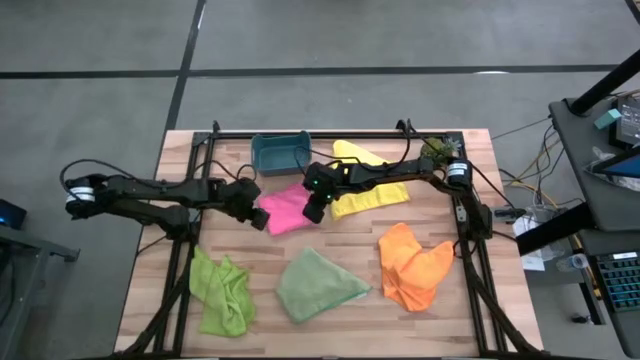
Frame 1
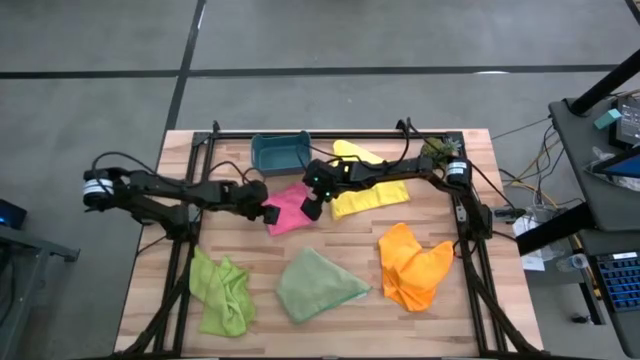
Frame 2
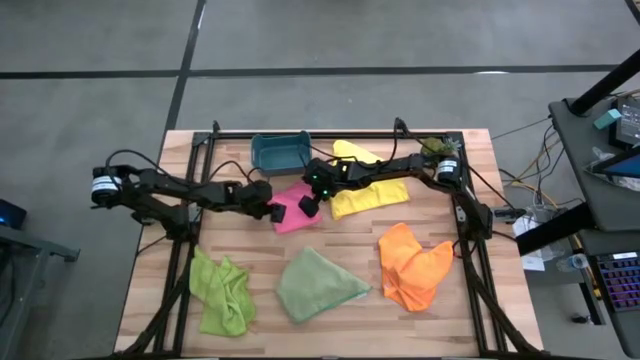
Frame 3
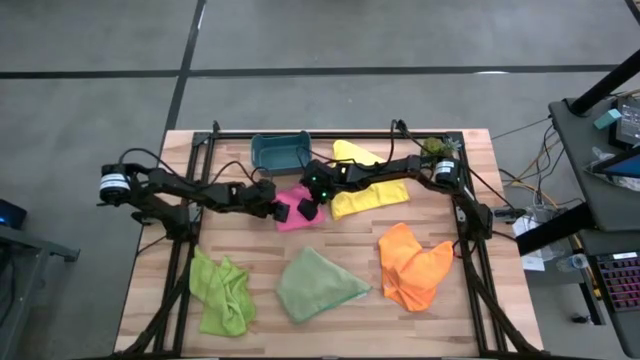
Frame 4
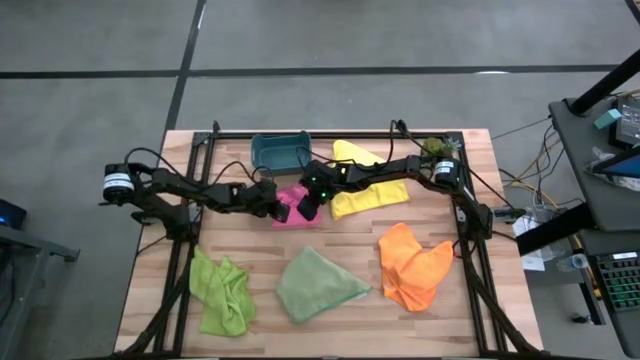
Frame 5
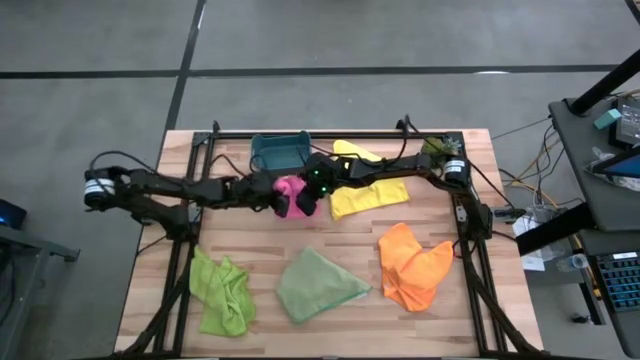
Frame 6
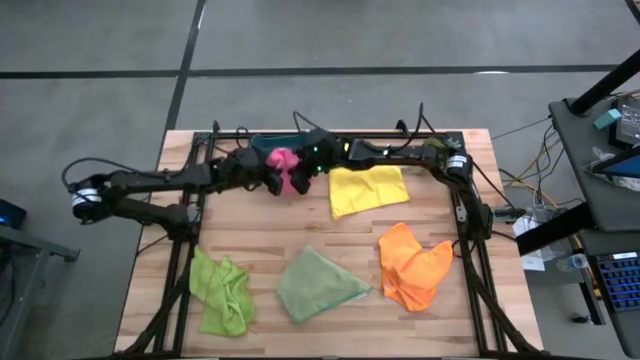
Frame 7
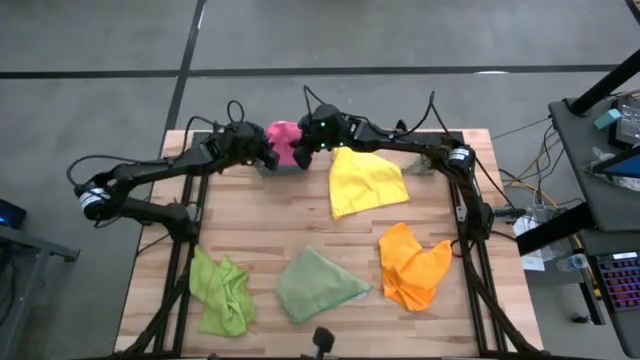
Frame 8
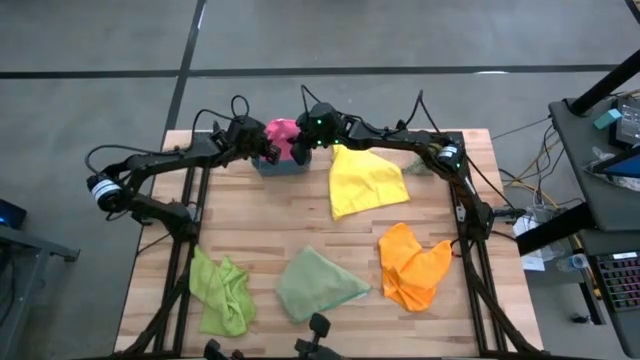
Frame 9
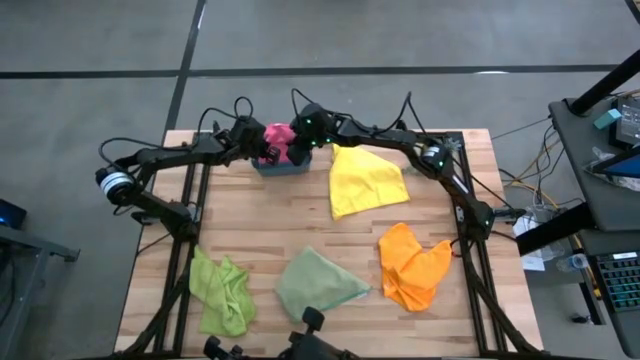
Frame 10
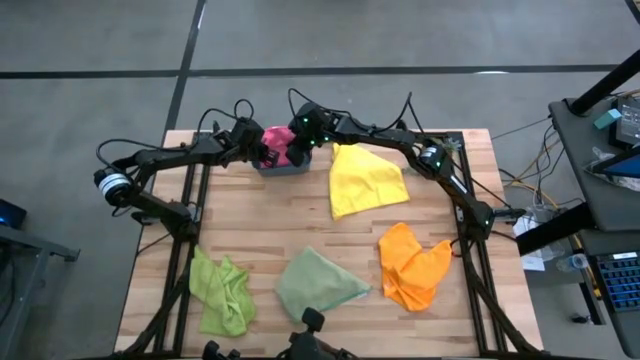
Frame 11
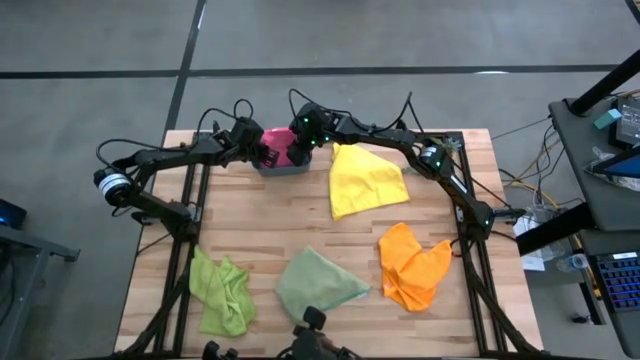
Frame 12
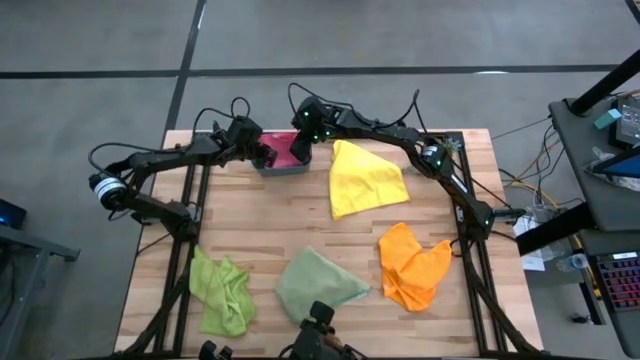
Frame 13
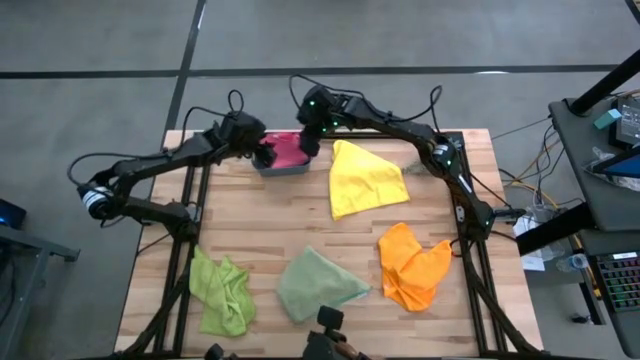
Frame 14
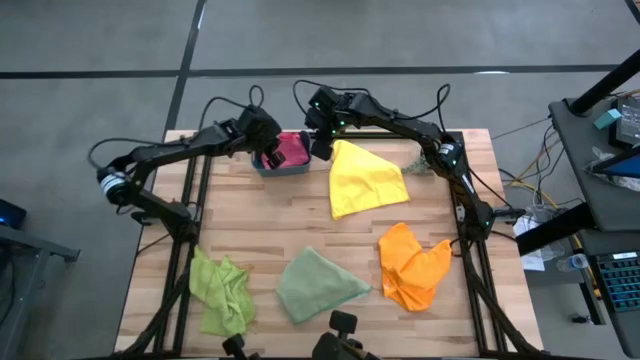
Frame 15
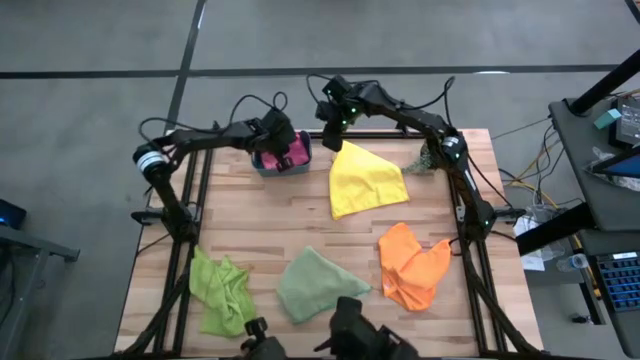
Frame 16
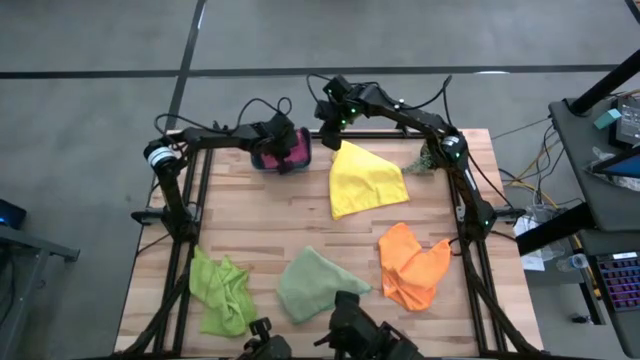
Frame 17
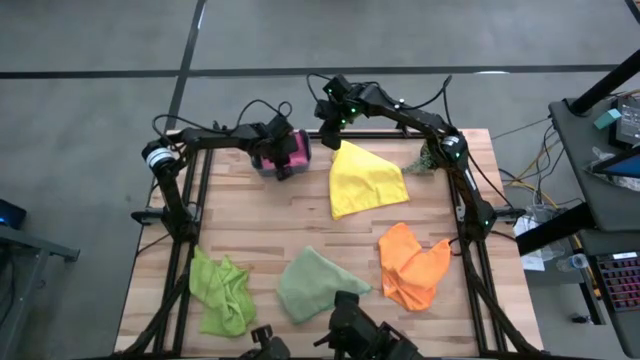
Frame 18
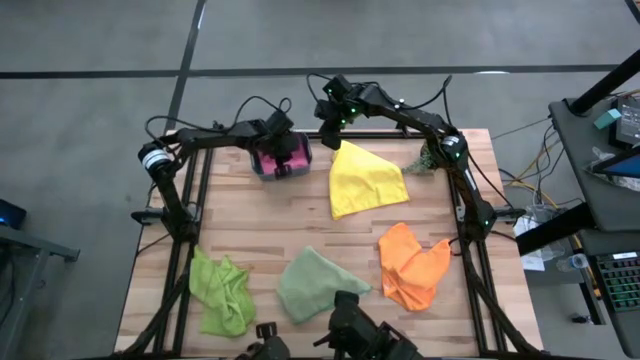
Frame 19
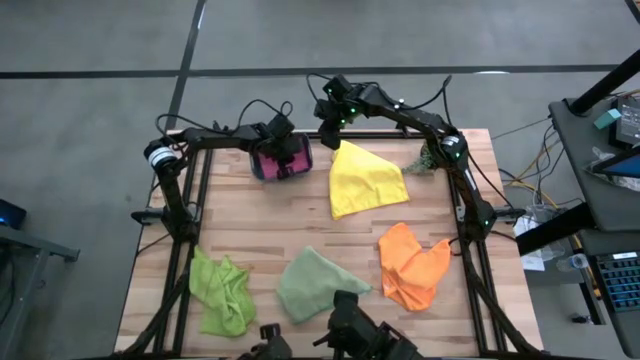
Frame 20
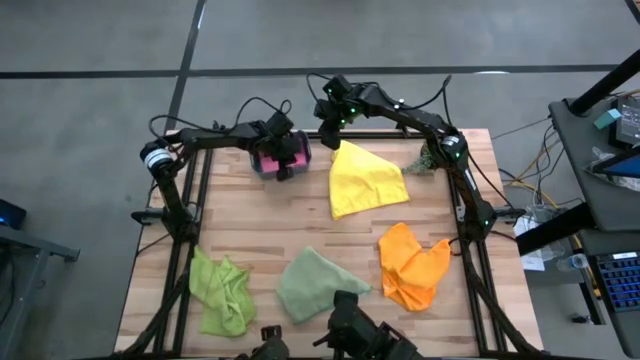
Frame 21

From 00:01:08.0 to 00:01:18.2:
Task: Fold microfiber towels
Put the pink microfiber towel into the green bin

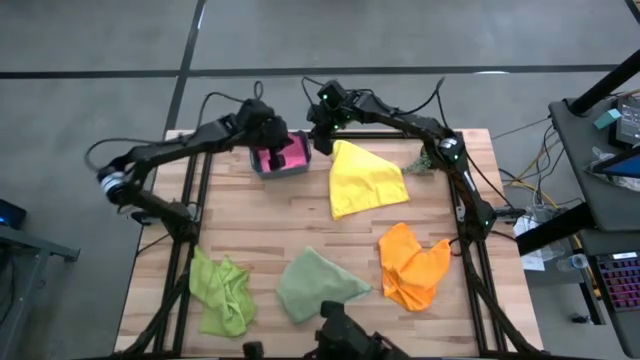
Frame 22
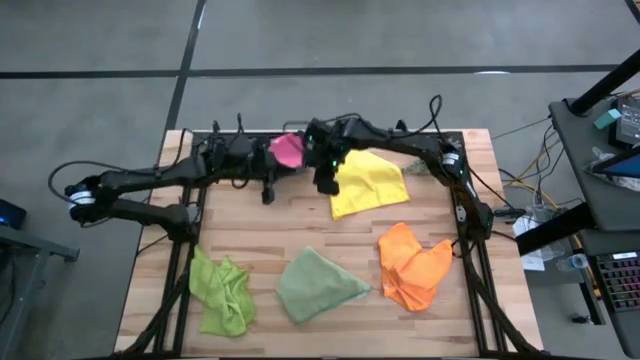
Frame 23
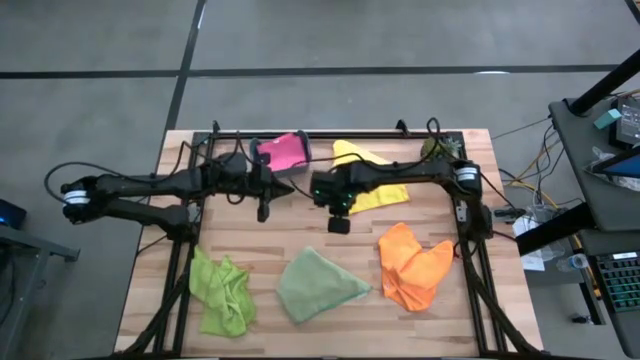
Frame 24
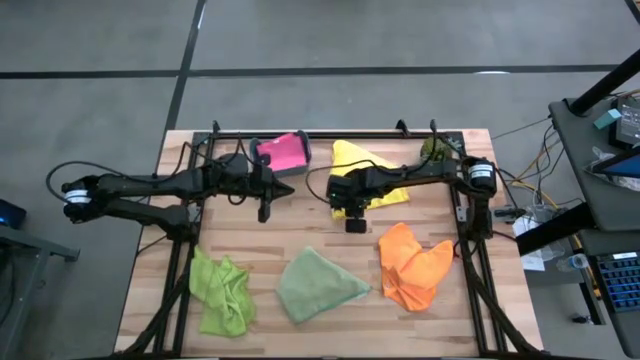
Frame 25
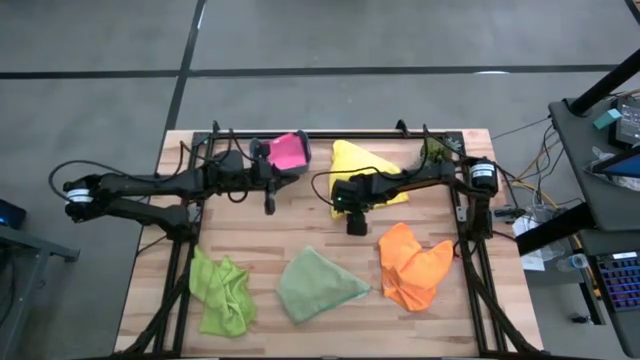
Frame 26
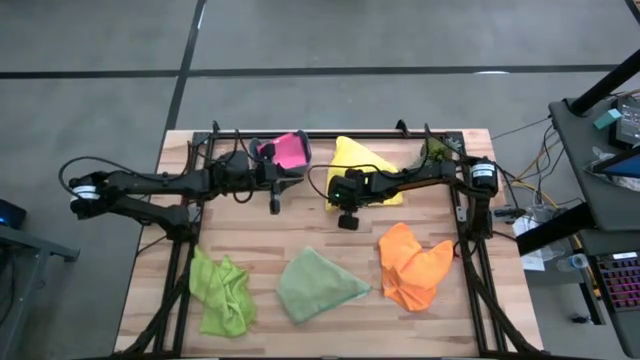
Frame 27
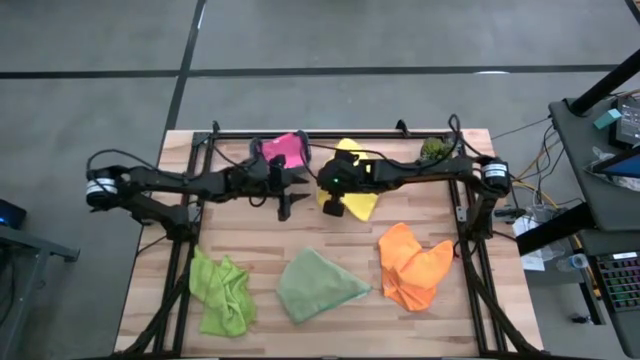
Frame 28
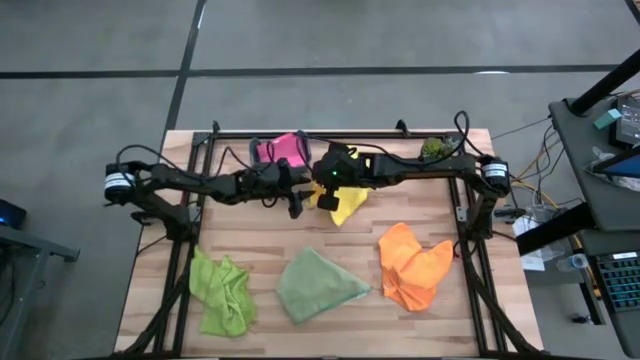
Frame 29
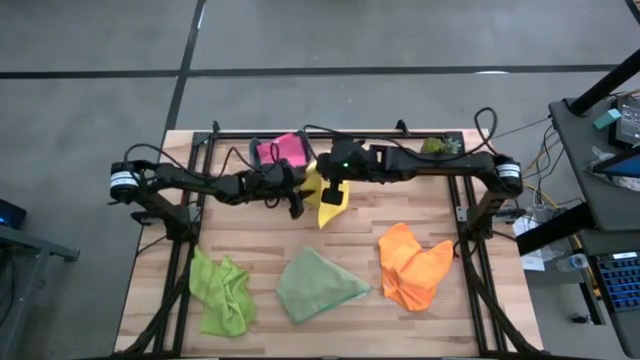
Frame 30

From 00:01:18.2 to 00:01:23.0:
Fold the yellow microfiber towel

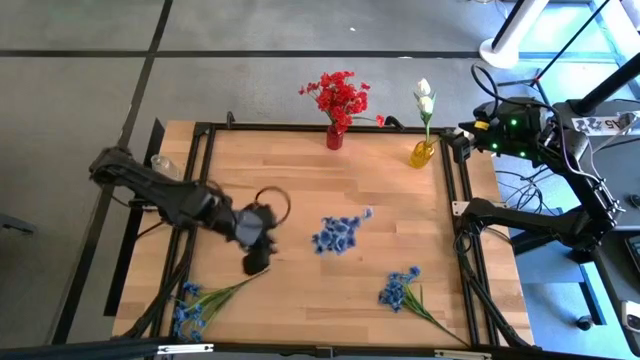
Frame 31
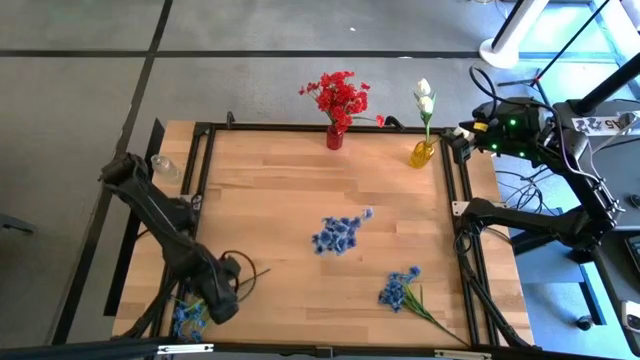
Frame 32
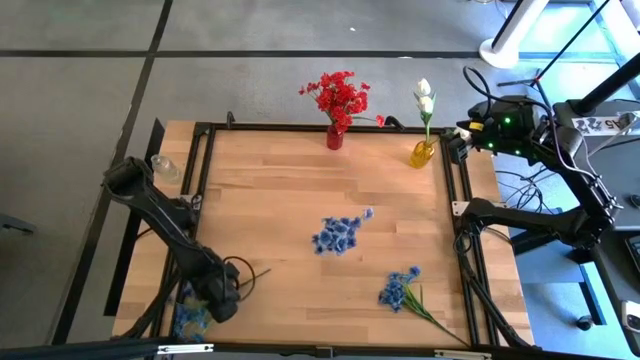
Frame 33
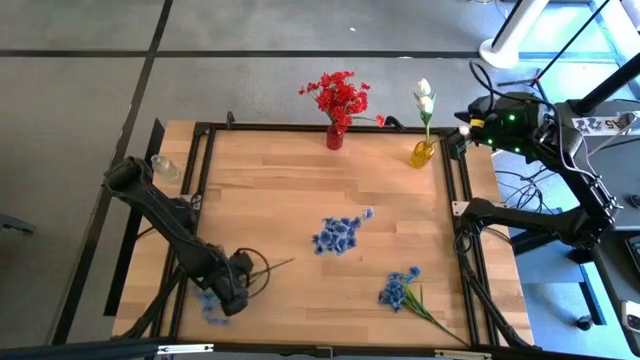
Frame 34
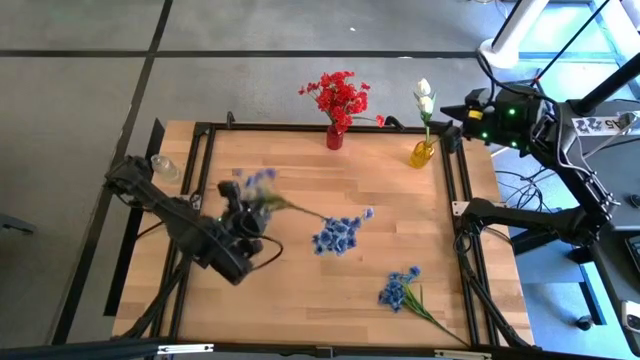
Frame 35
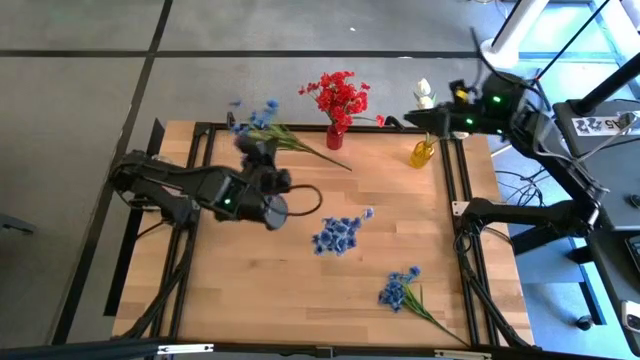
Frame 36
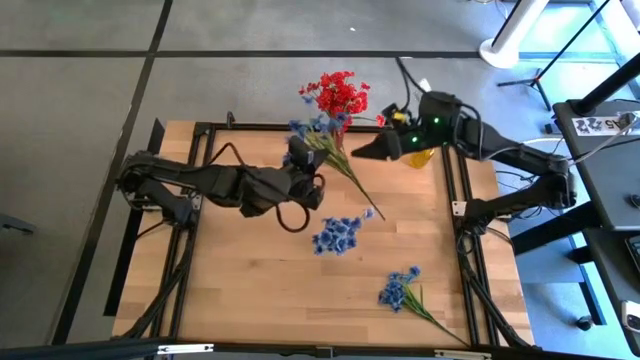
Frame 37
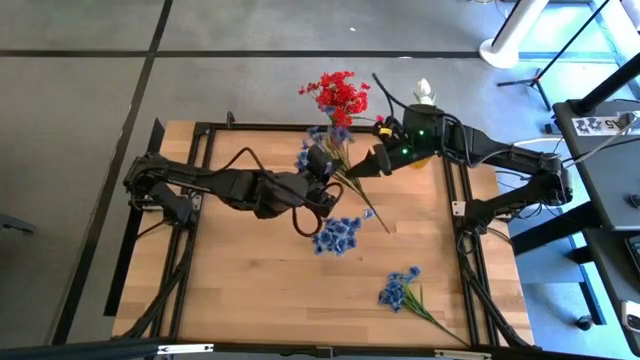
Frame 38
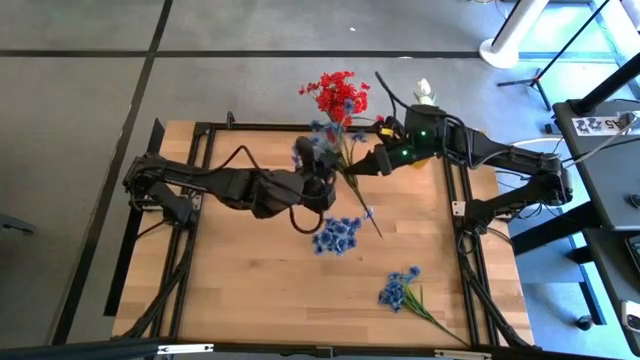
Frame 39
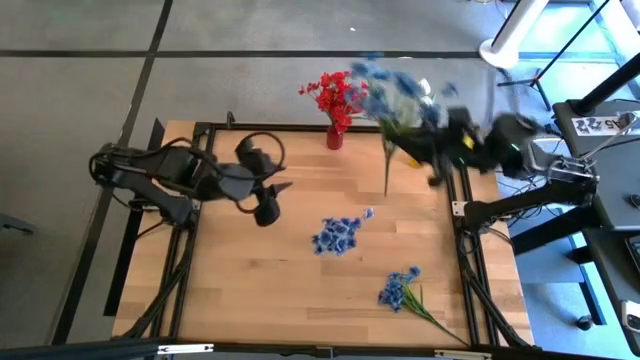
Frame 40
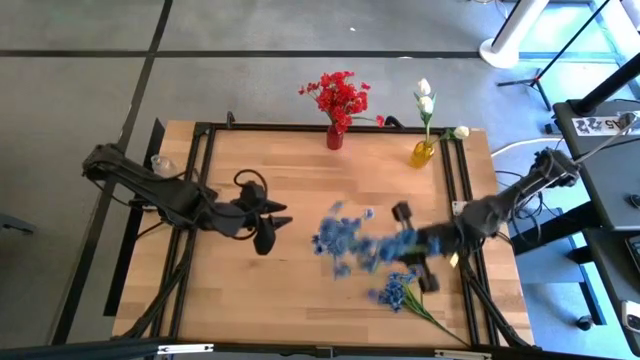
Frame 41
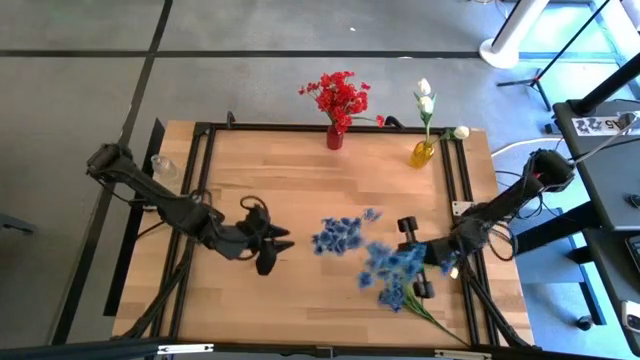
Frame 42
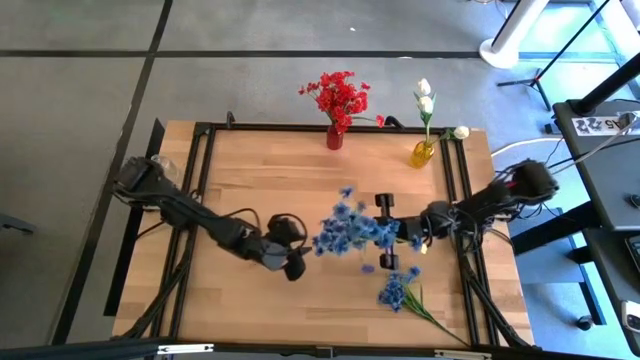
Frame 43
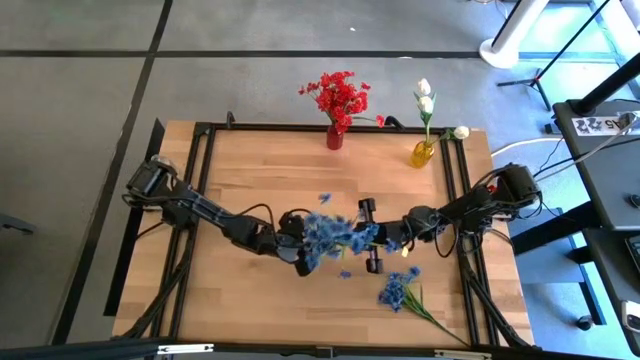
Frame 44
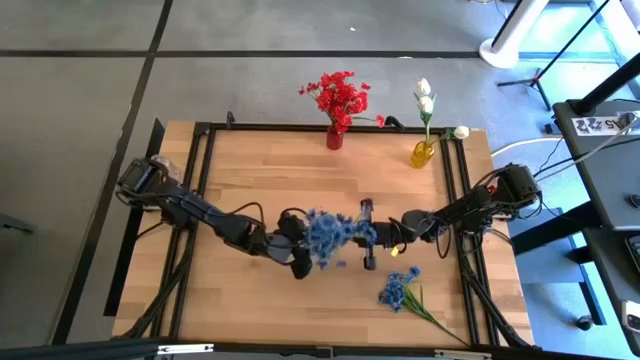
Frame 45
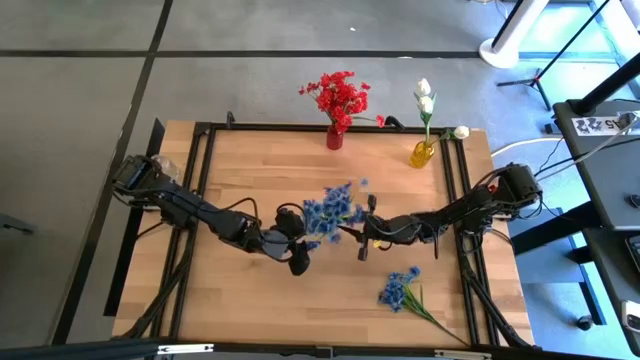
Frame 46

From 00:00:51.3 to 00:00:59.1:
Task: Sort flowers into vase by color
Put the left blue flower into the transparent vase
